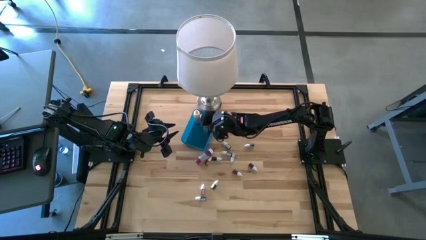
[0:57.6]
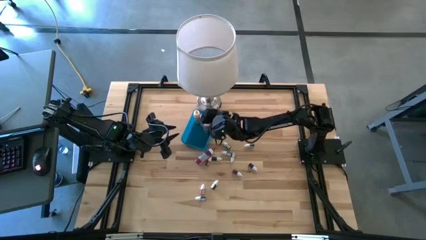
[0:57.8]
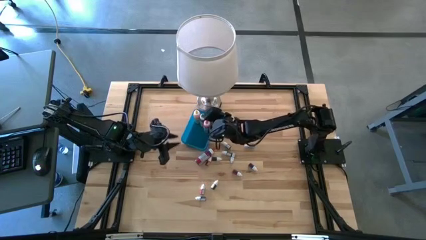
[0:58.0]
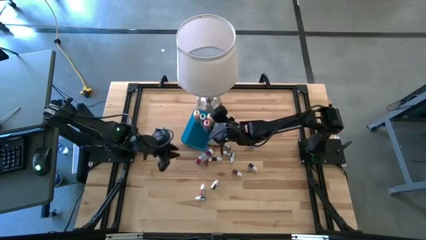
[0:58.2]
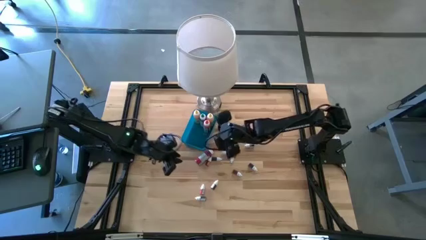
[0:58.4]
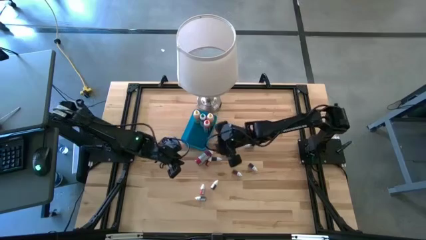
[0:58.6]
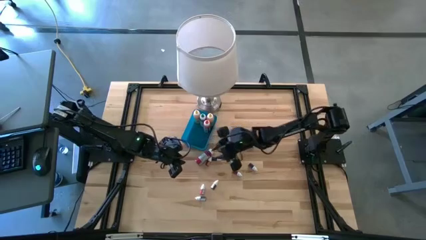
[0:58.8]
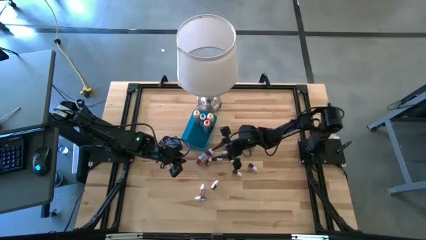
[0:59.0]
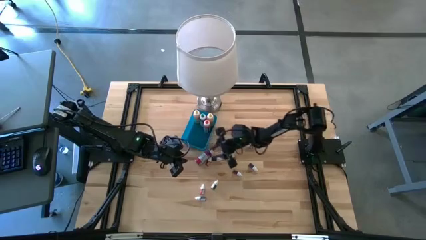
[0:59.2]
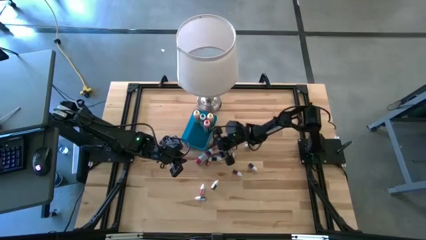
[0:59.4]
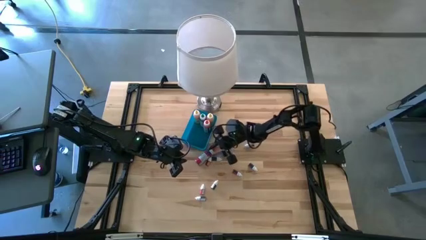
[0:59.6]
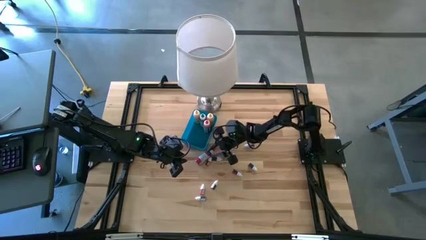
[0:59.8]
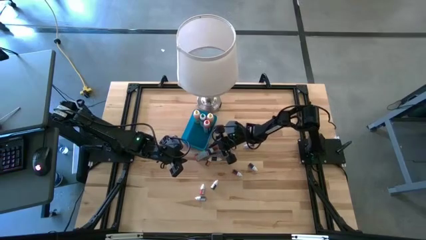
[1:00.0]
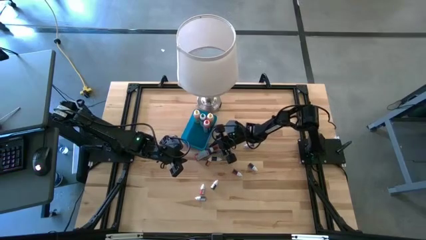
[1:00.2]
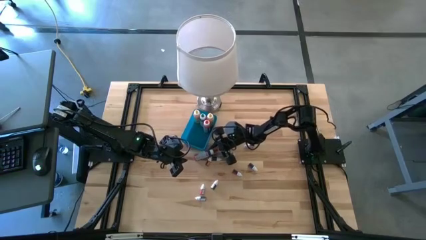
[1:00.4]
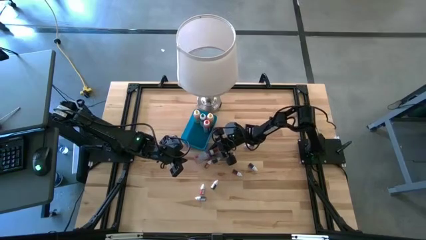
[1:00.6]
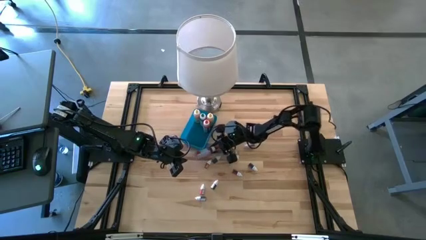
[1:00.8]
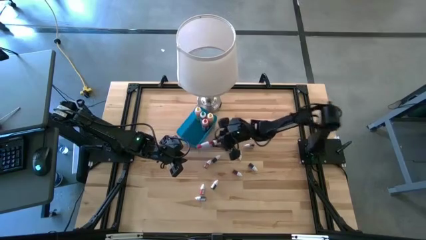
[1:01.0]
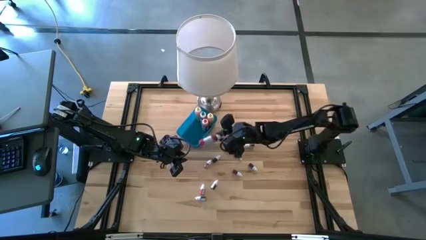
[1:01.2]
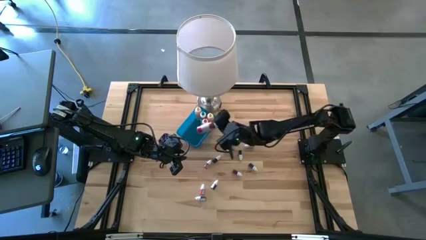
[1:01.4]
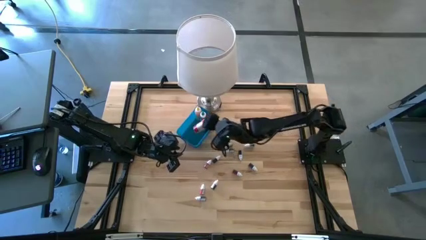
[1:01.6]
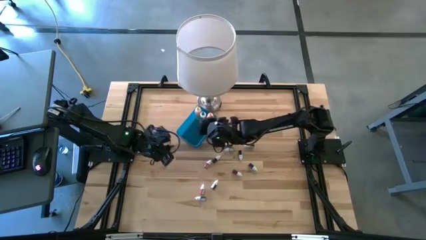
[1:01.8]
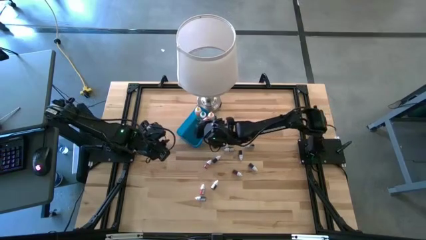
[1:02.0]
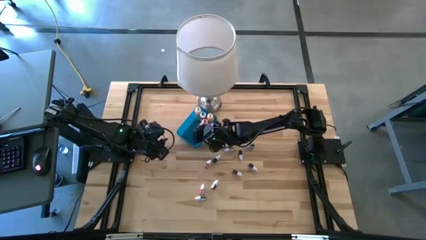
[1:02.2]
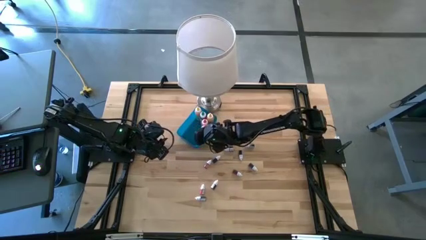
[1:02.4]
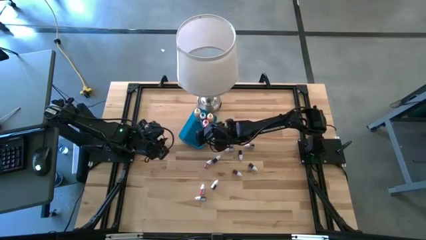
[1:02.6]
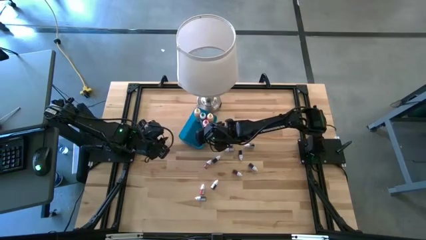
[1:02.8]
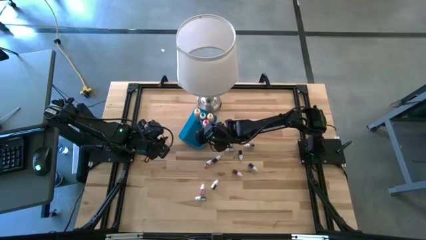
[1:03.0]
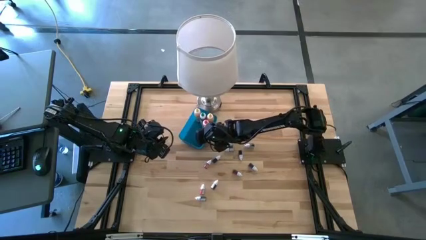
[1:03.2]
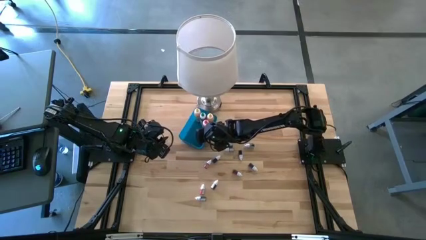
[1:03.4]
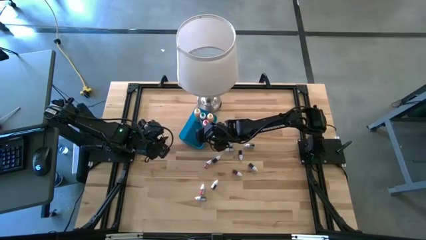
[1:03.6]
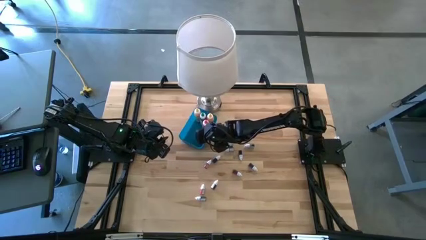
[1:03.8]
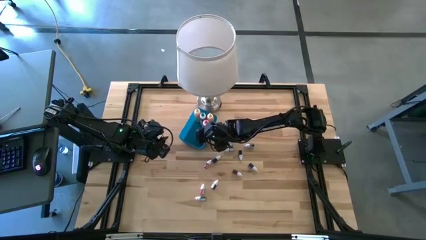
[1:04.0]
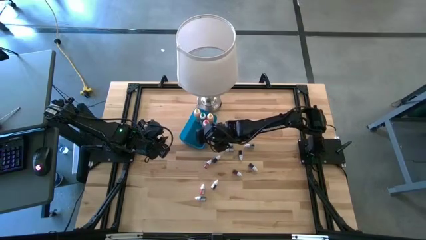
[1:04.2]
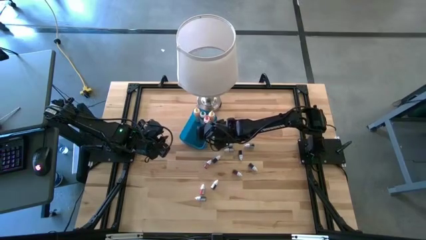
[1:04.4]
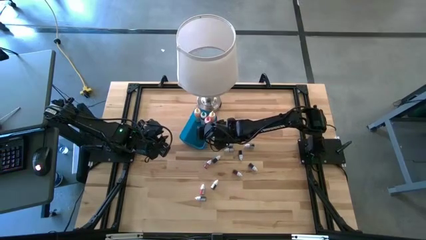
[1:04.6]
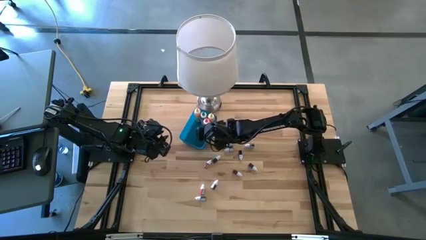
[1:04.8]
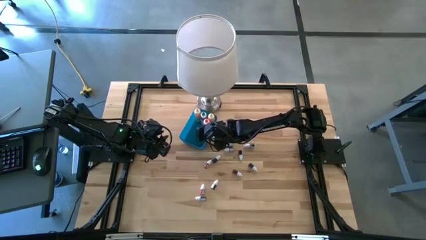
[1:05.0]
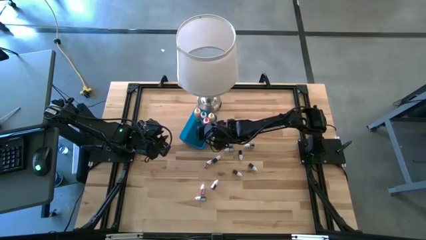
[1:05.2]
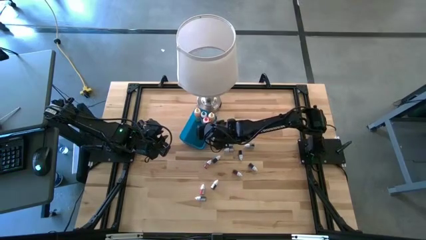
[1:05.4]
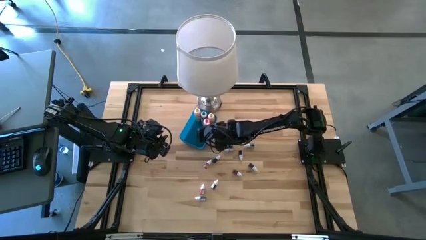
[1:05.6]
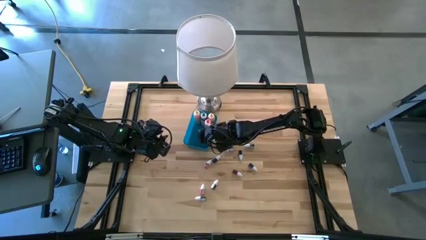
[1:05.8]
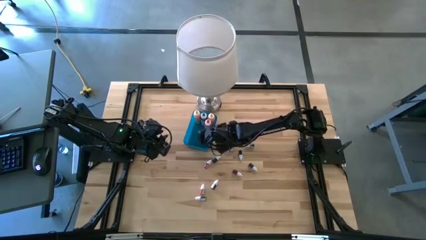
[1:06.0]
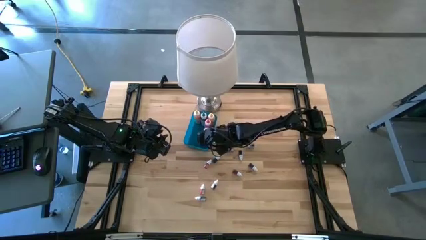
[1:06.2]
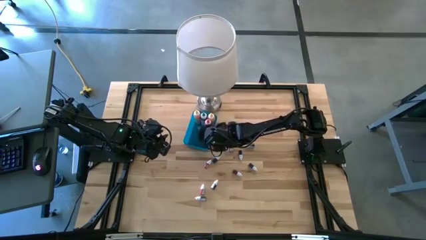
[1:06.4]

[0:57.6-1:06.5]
Task: Pick & Place food coloring
Put the large red food coloring bottle into the blue bin

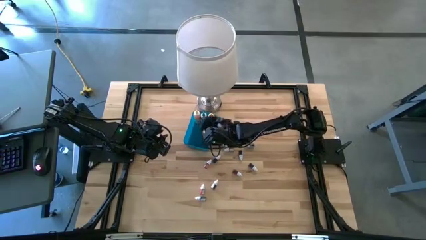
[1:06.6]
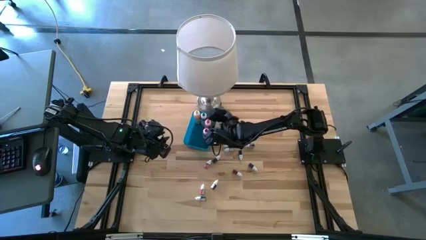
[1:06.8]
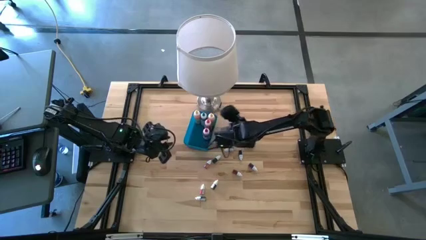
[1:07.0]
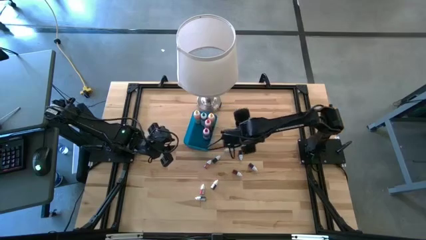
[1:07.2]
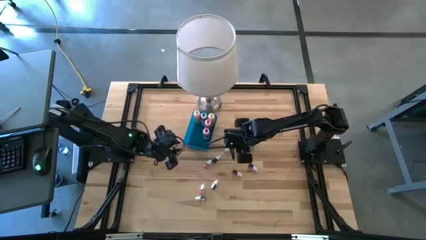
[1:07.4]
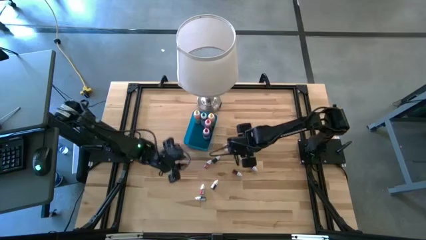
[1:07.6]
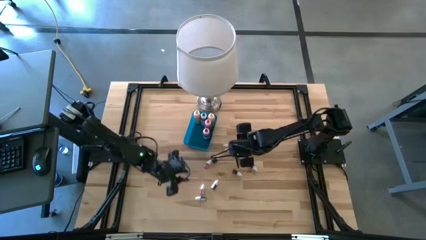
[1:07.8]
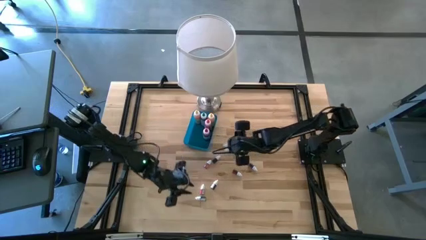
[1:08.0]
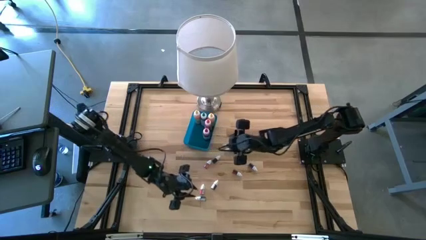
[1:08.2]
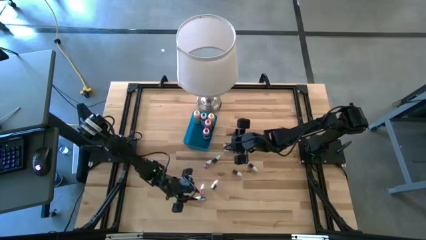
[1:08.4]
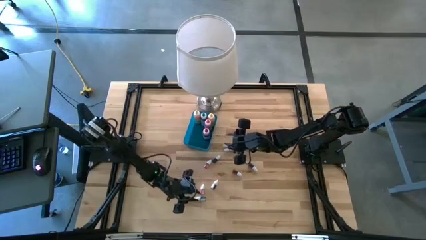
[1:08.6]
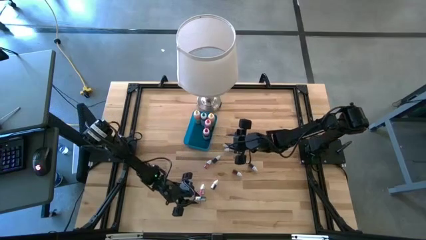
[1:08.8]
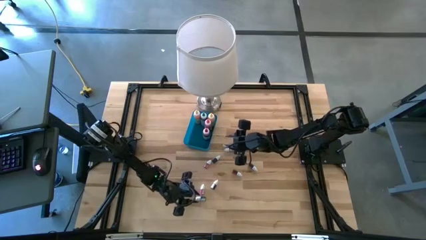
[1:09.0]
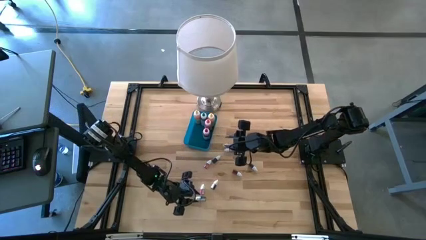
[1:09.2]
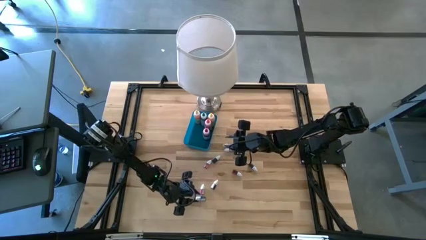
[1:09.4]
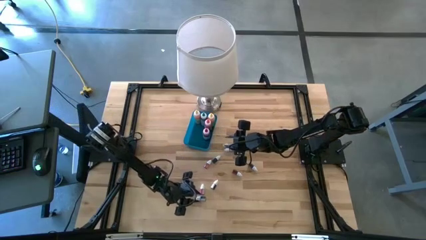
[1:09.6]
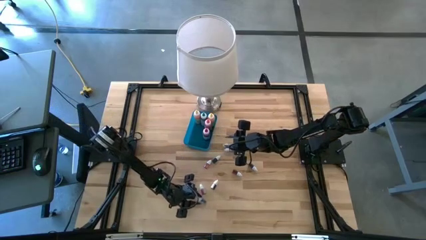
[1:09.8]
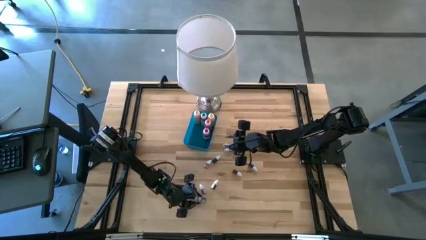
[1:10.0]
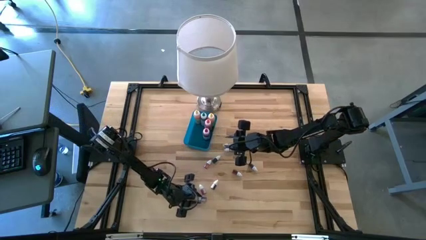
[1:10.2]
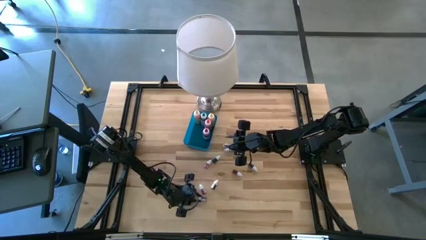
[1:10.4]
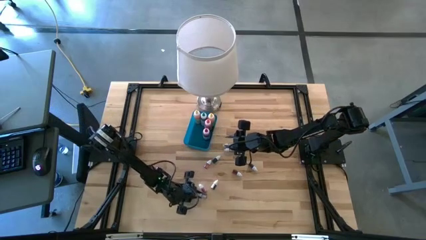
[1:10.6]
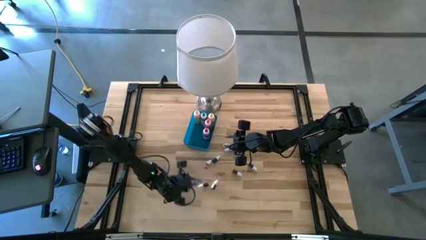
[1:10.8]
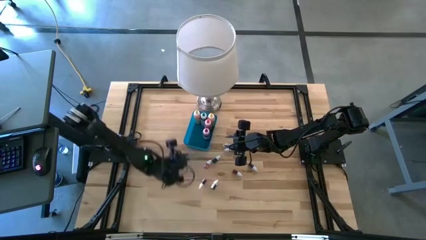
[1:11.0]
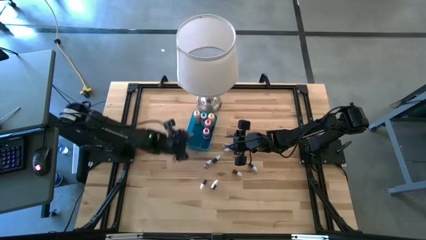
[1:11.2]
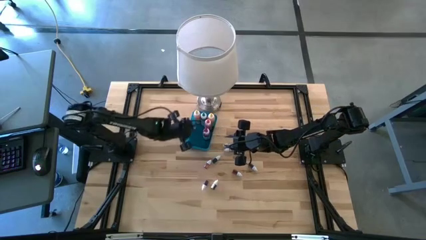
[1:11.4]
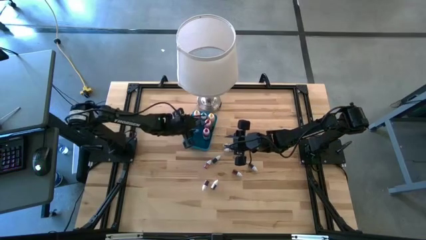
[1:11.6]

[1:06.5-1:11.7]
Put the small black food coloring bottle into the blue bin

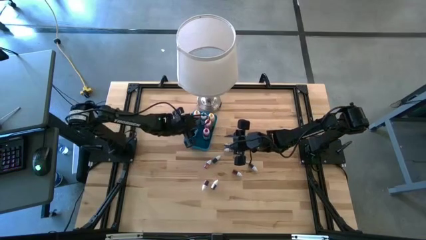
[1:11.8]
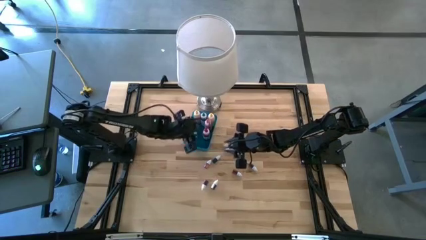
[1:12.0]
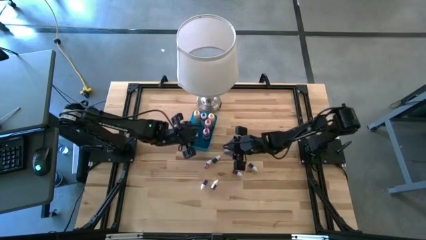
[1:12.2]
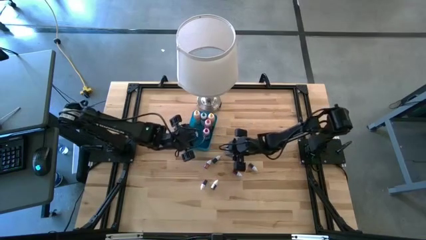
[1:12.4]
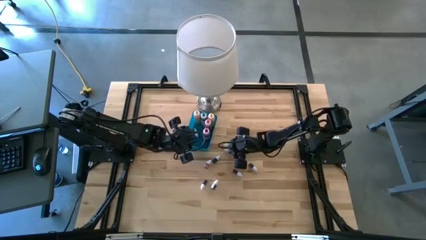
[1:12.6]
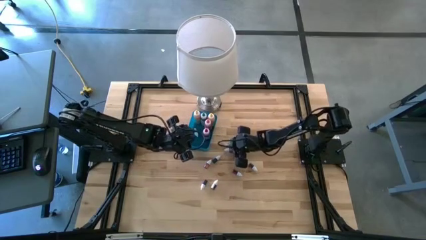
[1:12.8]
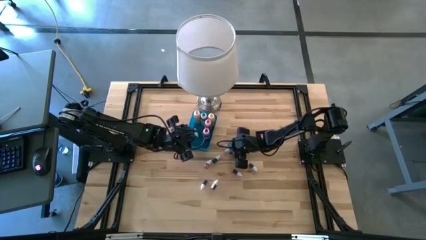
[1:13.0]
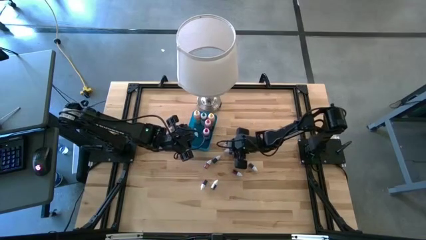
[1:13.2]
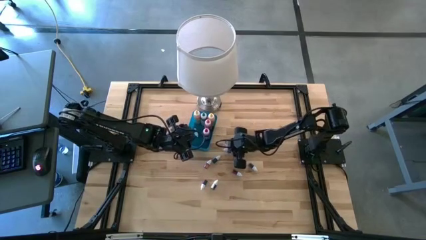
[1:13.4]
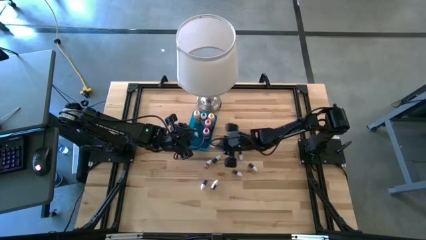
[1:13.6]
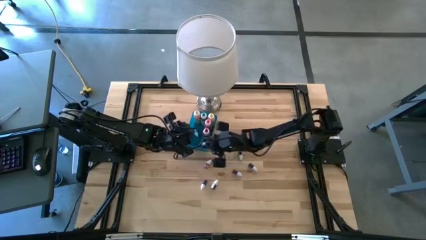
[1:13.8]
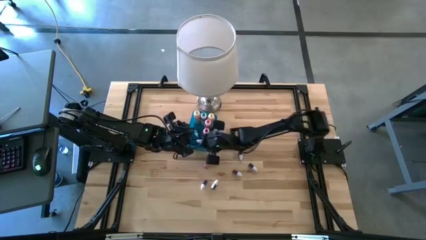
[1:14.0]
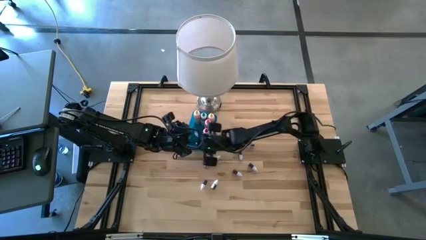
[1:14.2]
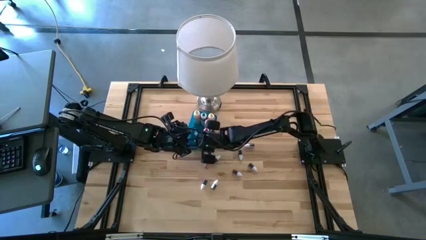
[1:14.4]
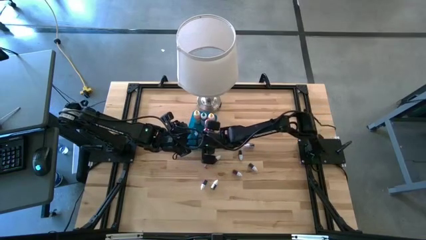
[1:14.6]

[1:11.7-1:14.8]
Put the small red food coloring bottle into the blue bin
